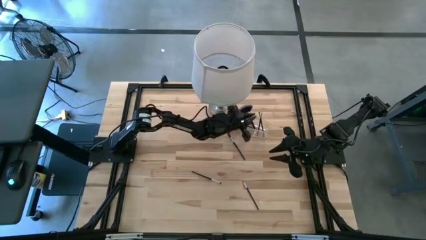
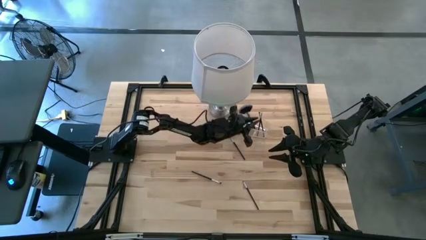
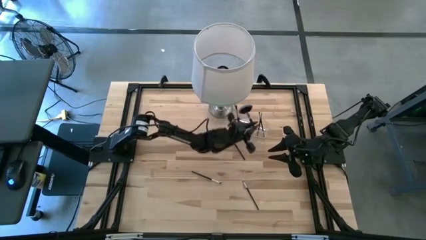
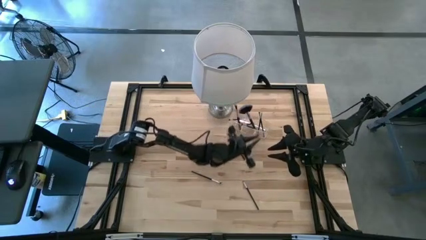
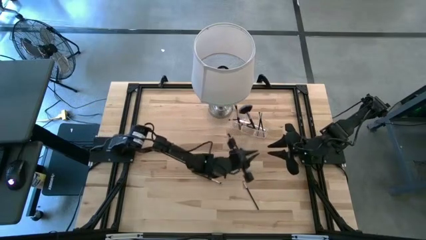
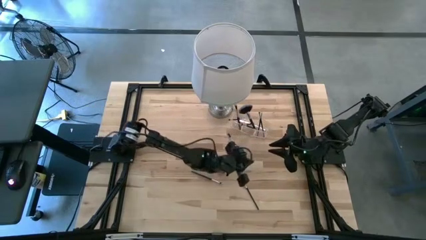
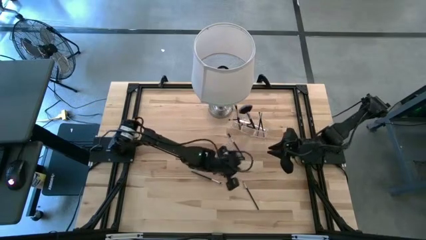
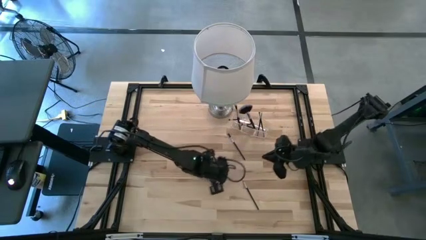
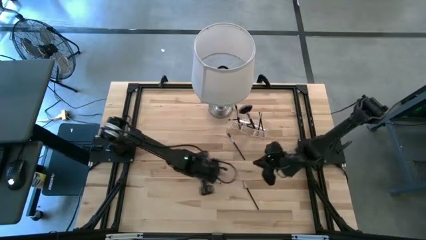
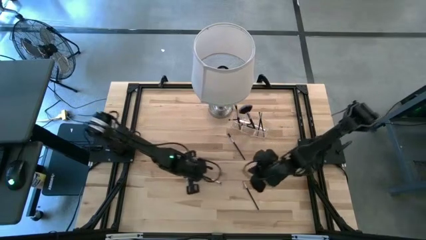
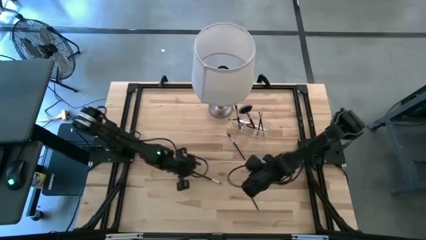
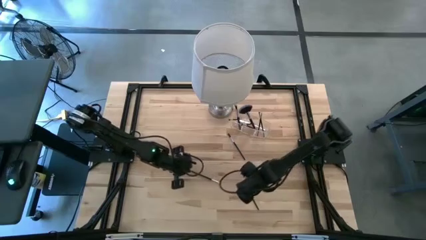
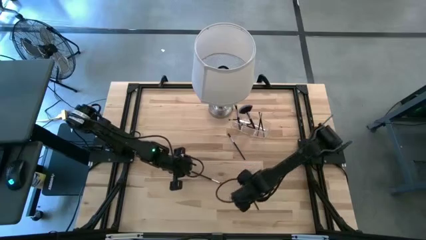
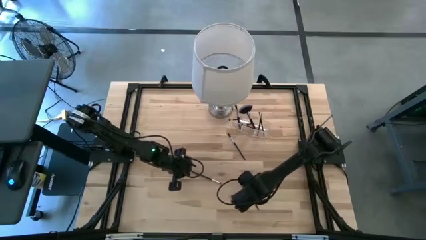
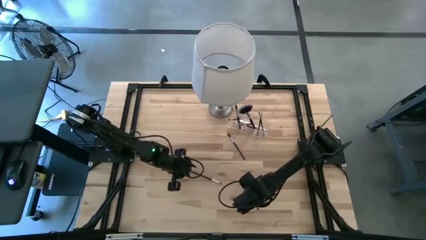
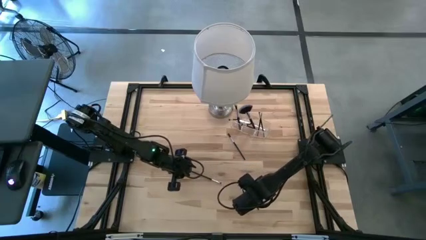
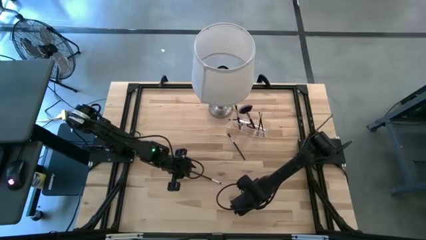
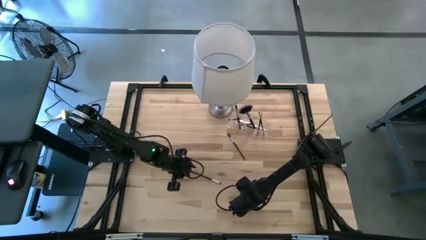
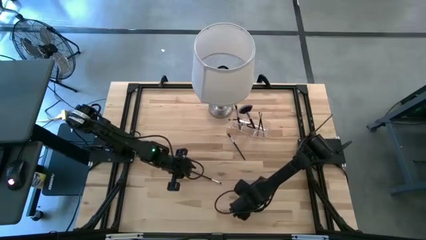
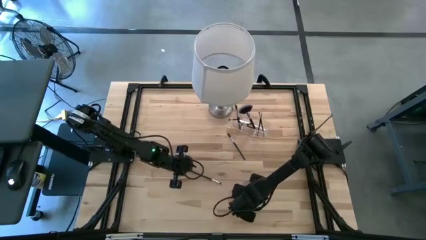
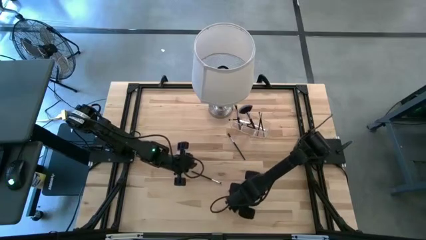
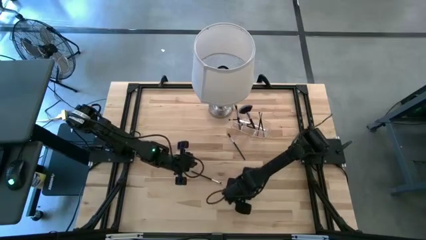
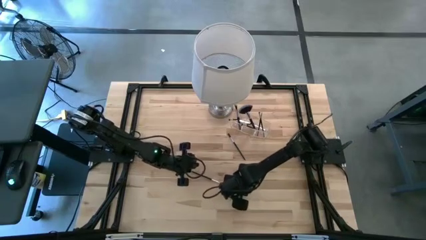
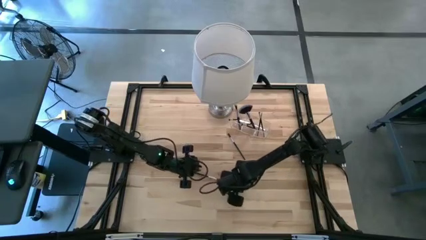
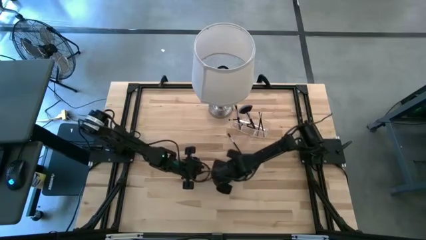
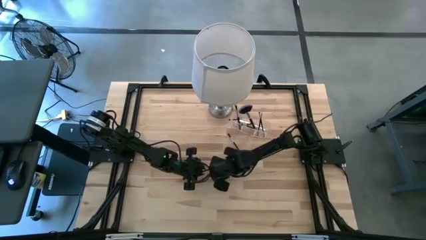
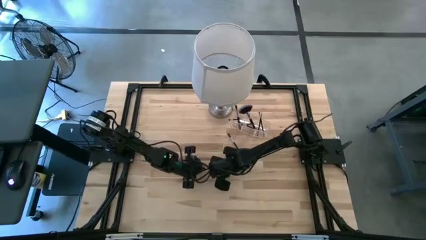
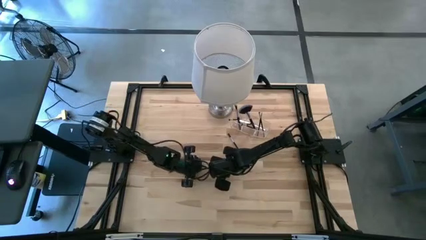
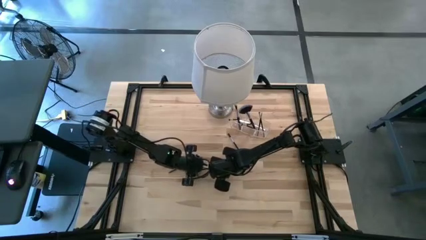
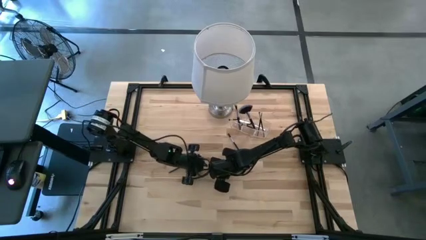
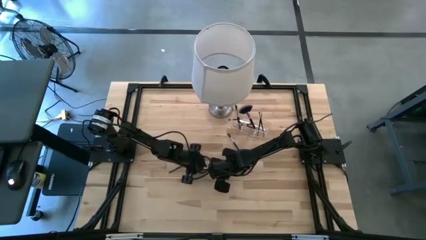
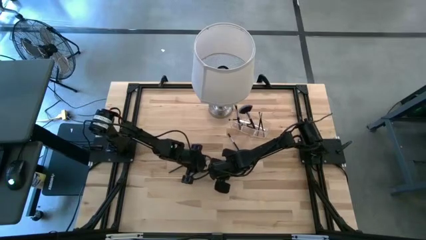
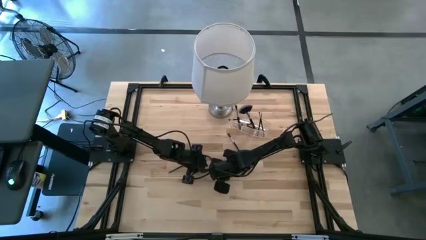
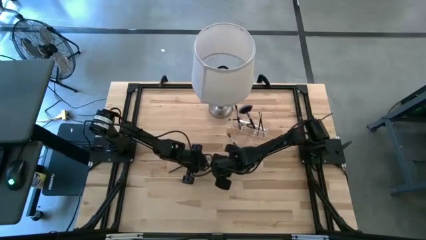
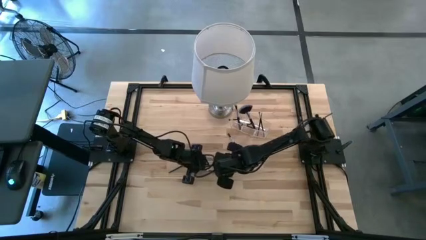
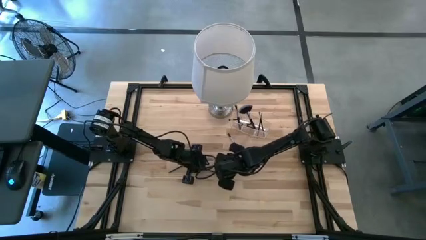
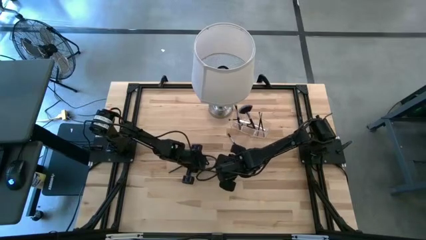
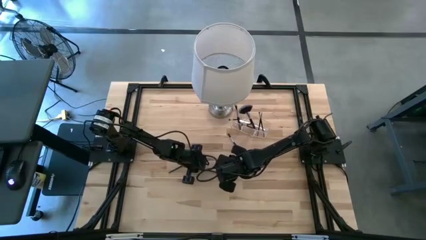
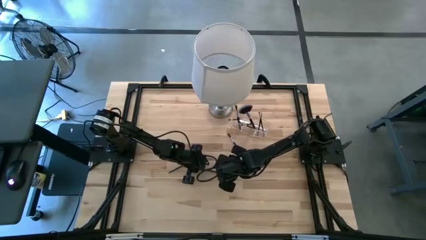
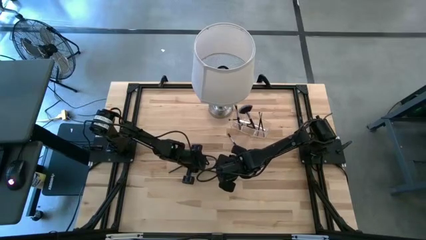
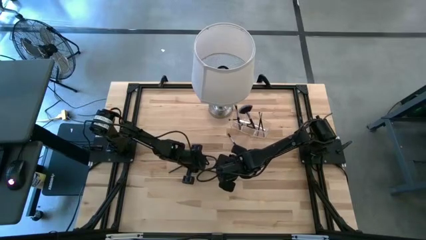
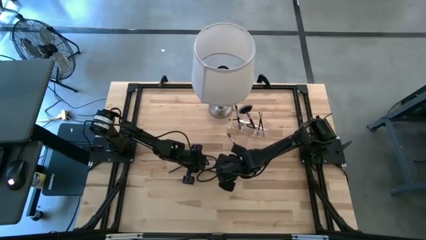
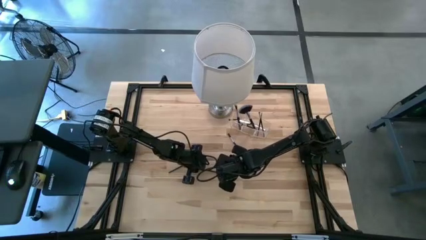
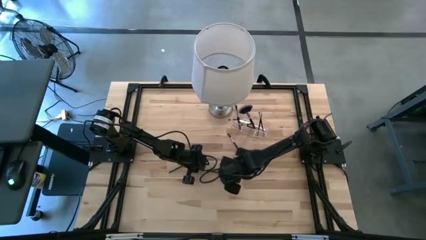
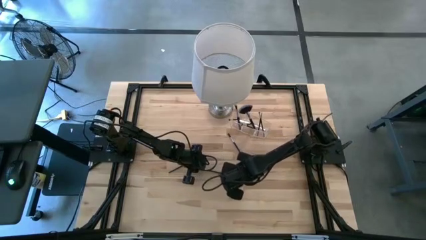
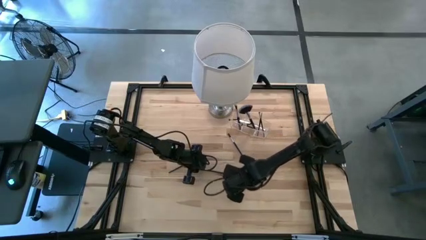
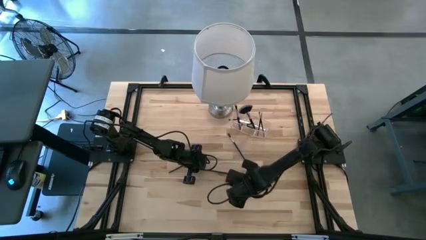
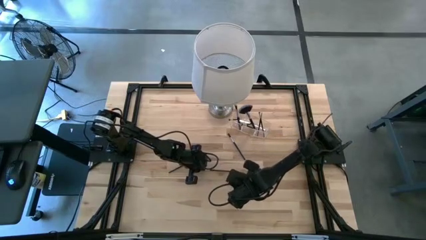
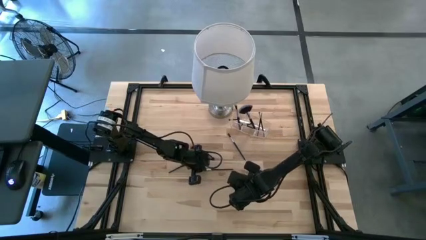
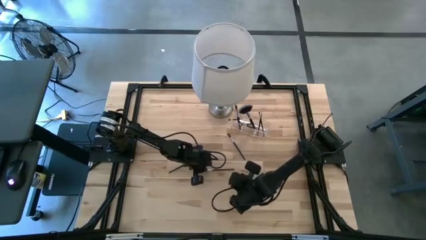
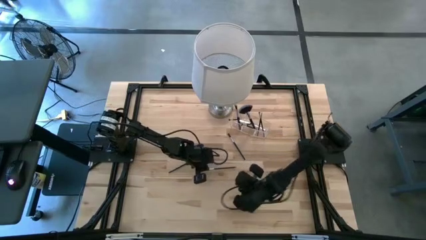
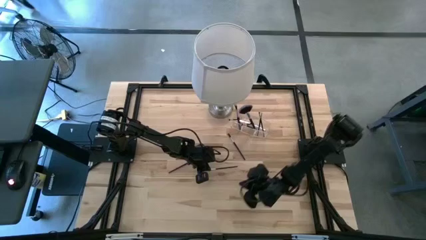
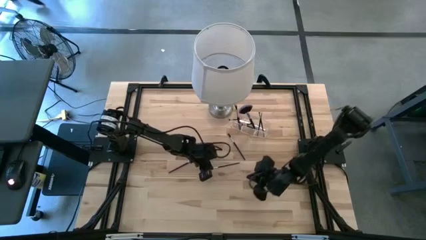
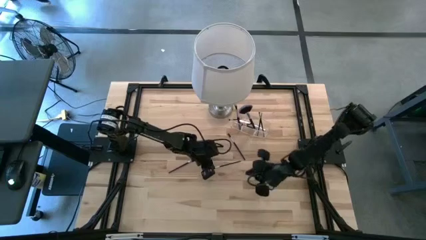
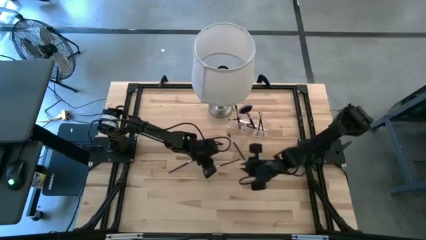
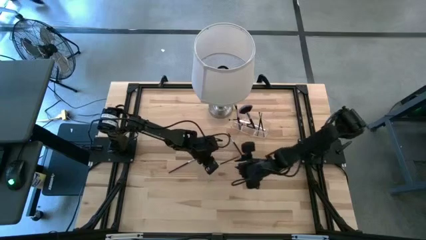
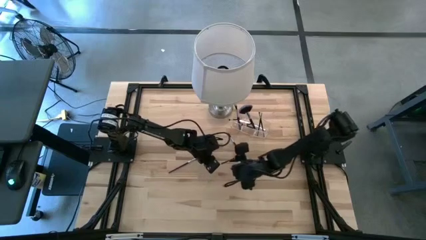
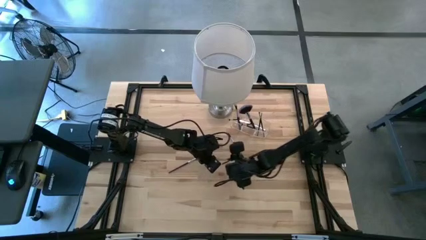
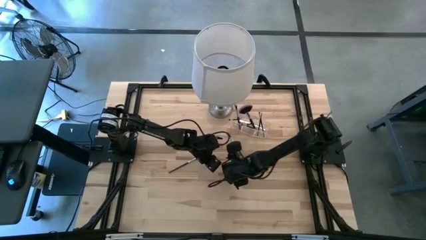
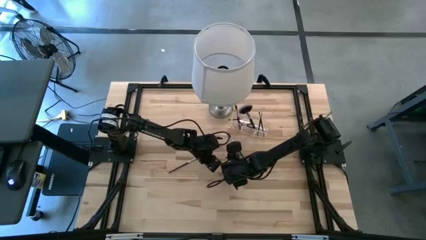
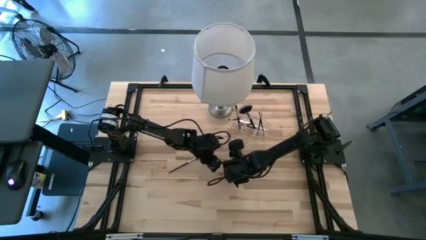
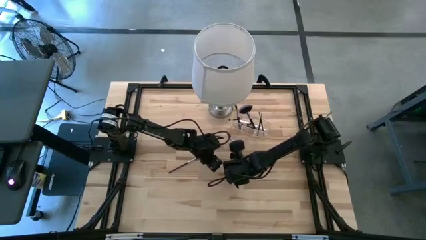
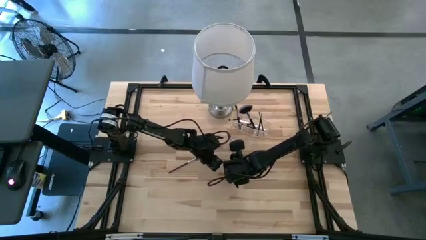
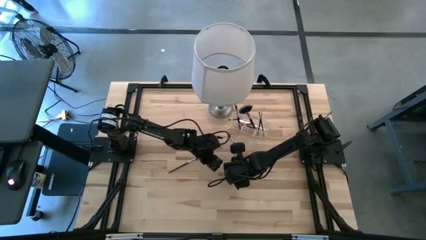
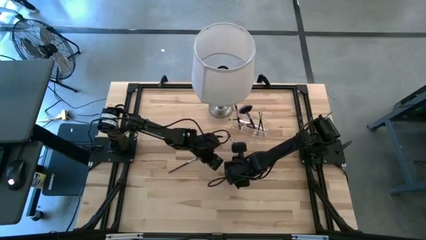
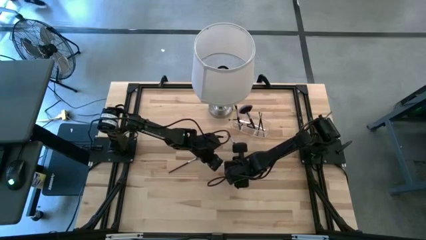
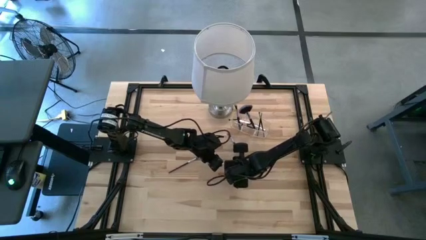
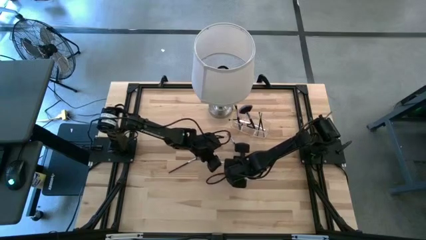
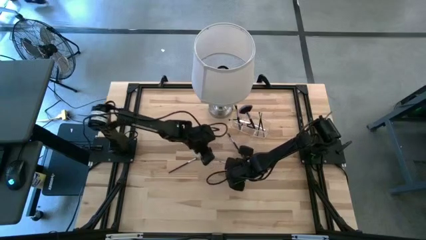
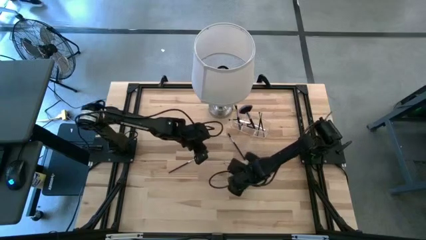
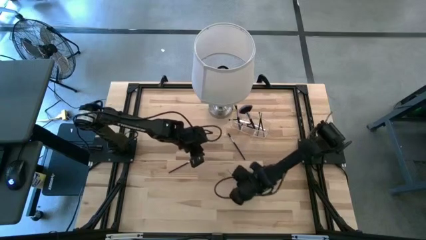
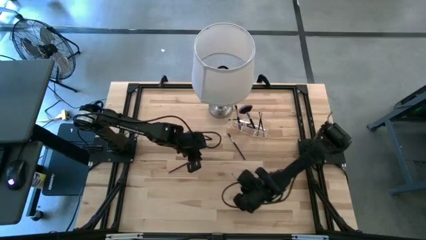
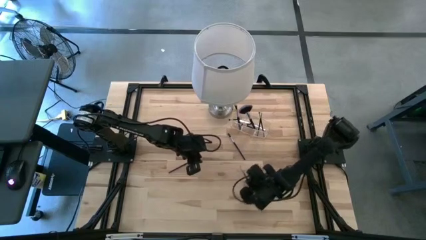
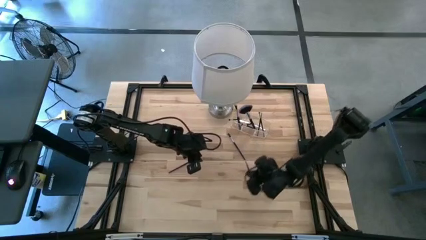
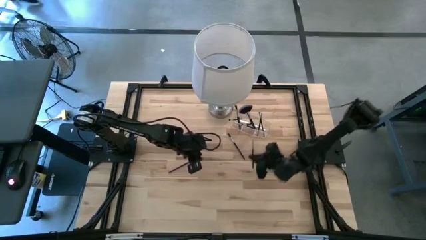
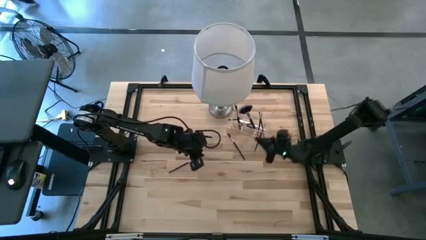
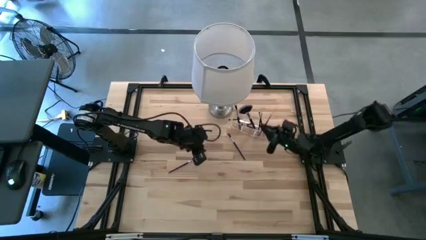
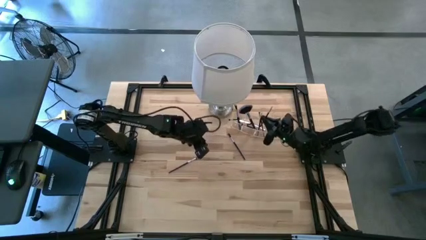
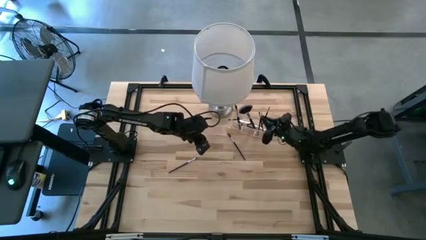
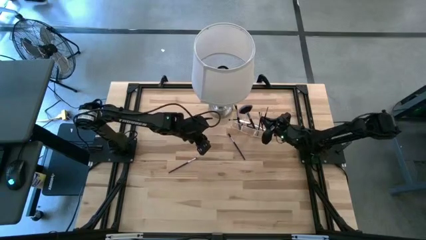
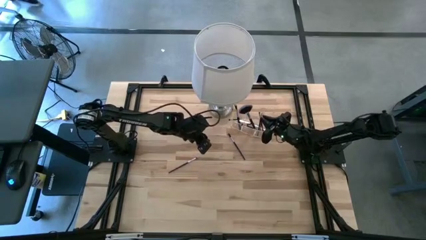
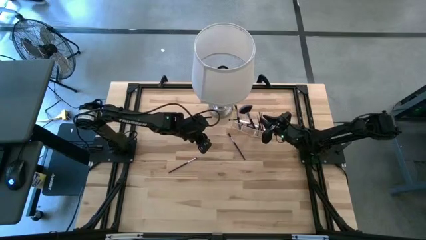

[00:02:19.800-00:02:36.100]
Task: Put items in baskets/containers
Put the eyeshadow brush into the transparent organizer

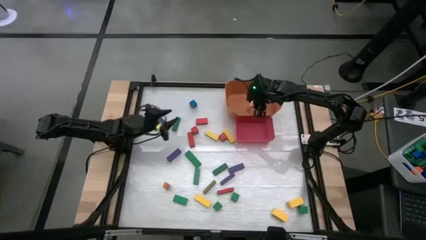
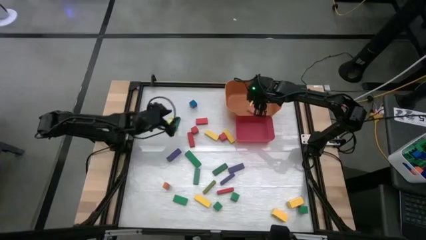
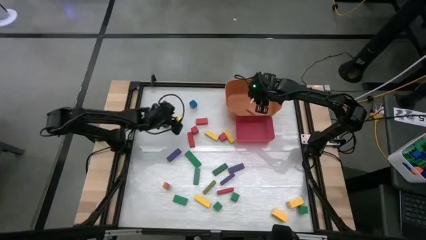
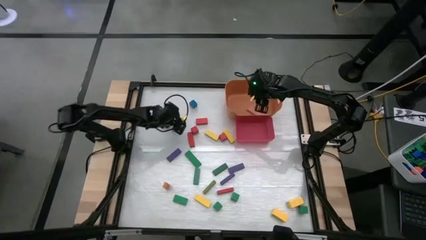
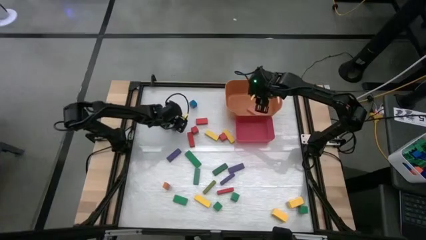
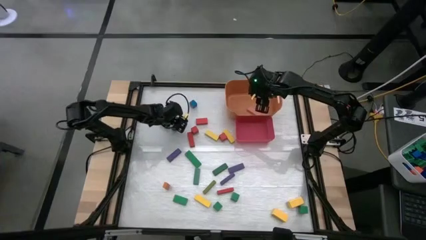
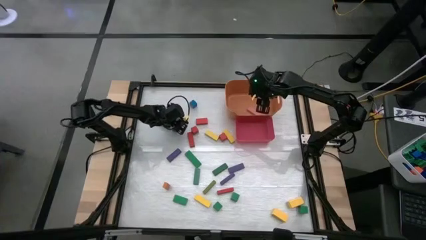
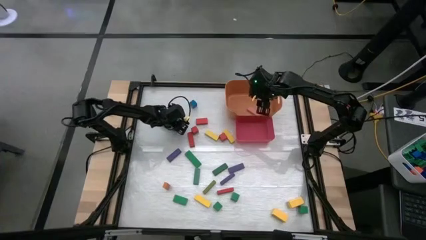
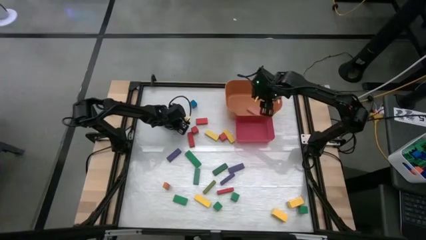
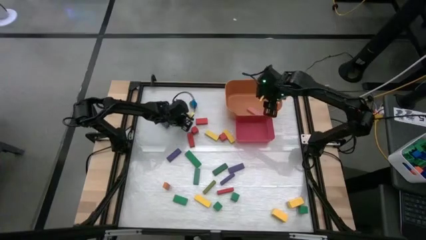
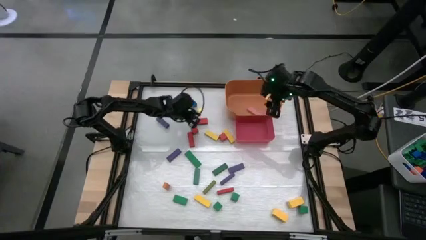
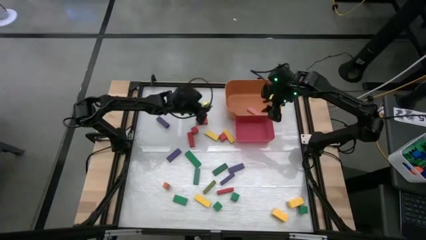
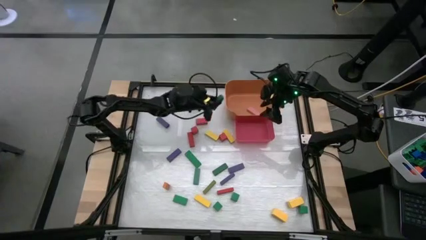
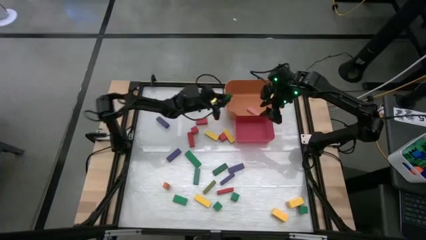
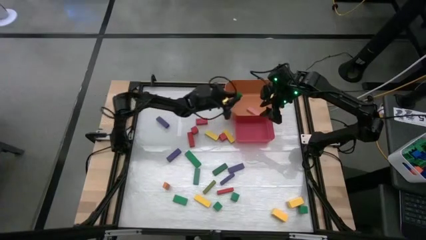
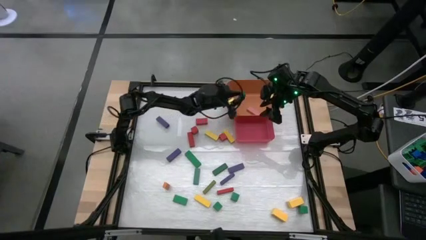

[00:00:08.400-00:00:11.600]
Task: Sort blocks by size
Put the green rectangle block into the orange bin
